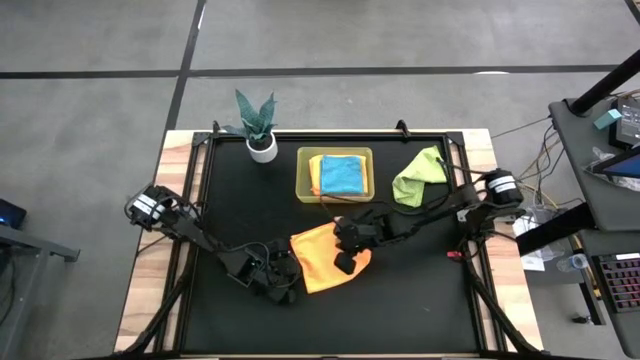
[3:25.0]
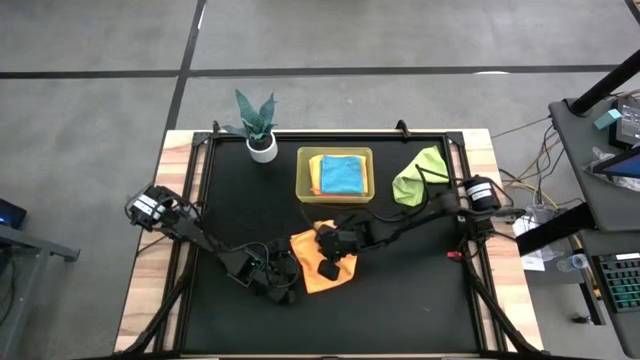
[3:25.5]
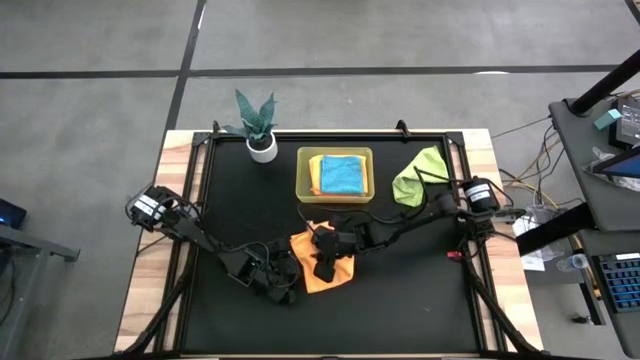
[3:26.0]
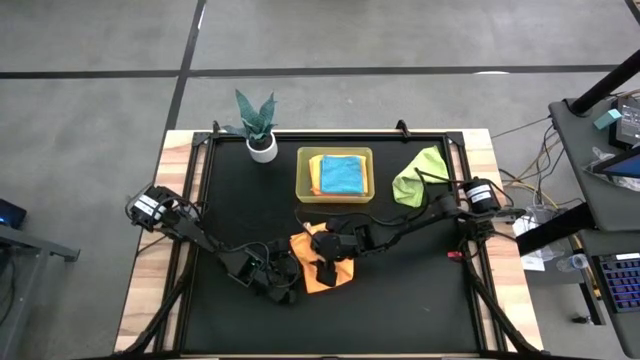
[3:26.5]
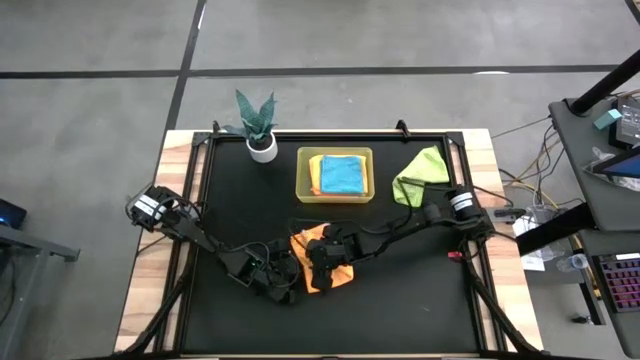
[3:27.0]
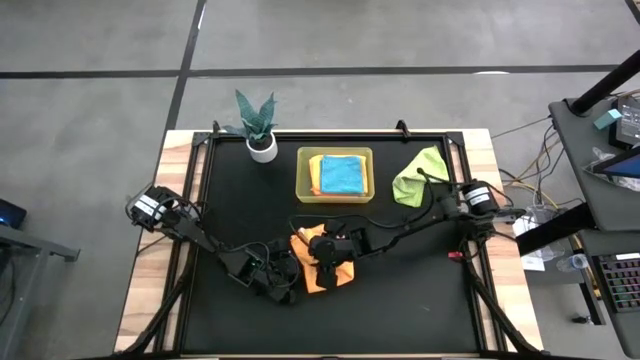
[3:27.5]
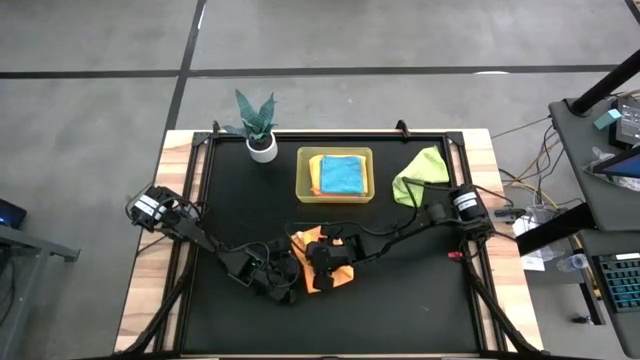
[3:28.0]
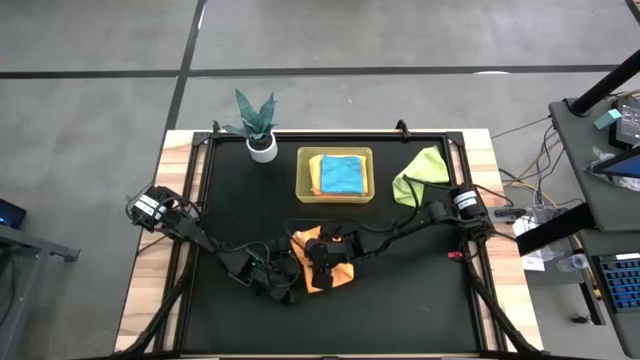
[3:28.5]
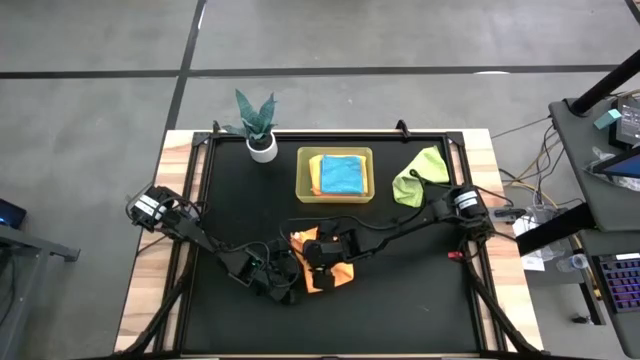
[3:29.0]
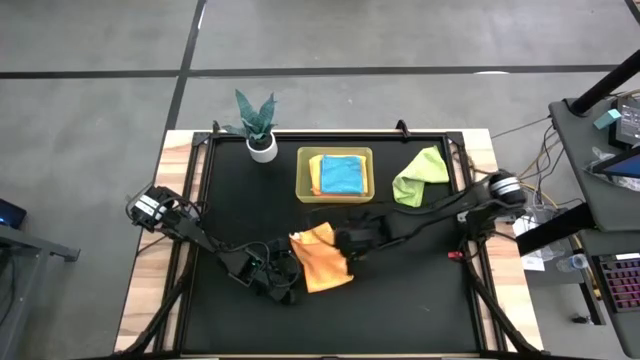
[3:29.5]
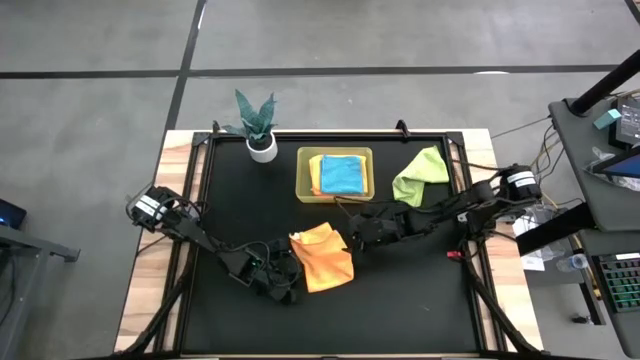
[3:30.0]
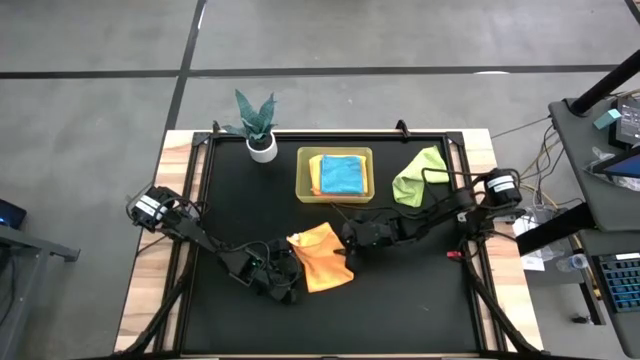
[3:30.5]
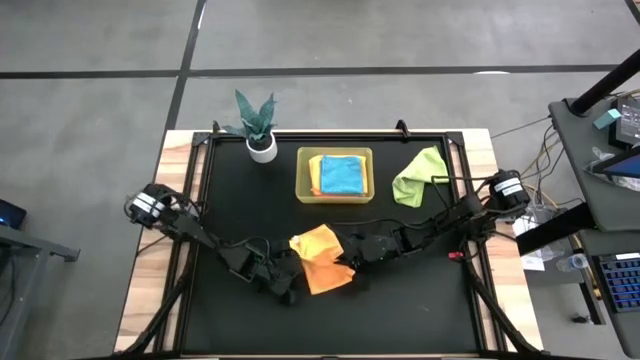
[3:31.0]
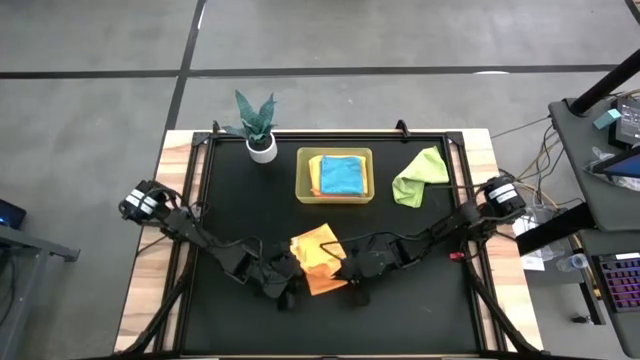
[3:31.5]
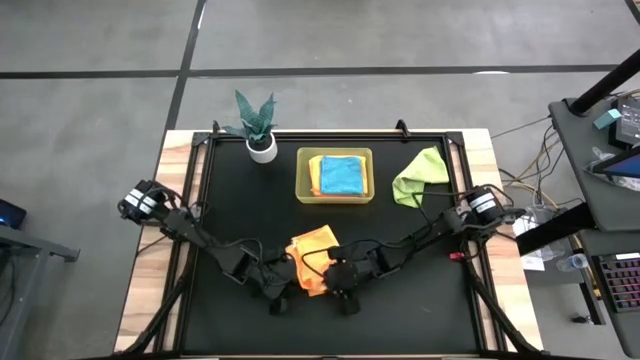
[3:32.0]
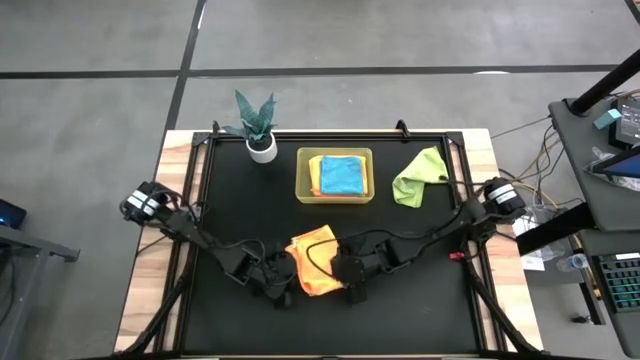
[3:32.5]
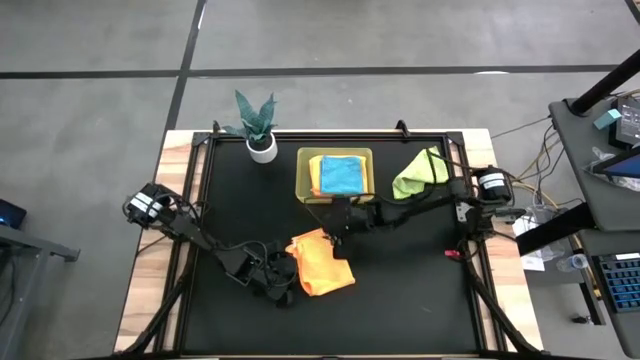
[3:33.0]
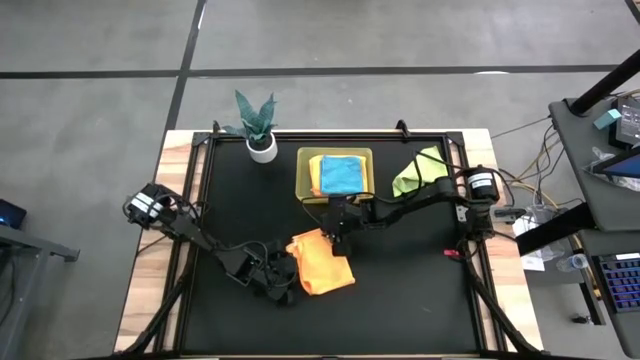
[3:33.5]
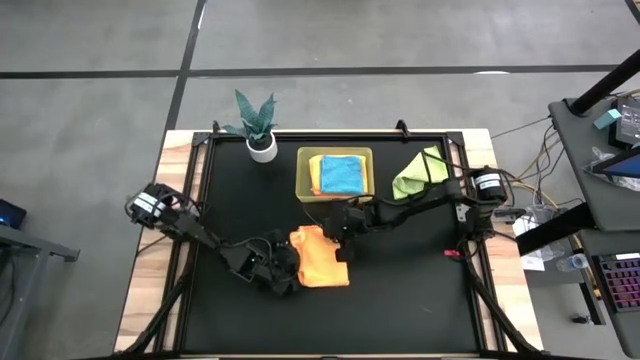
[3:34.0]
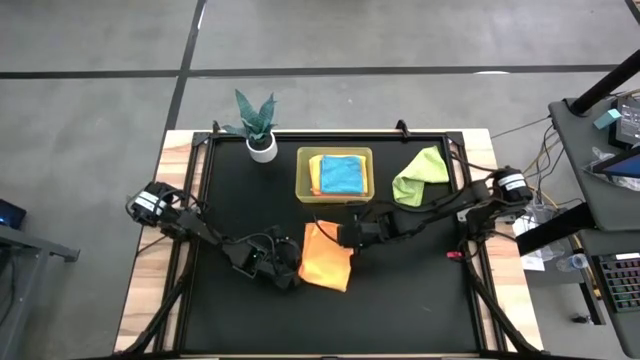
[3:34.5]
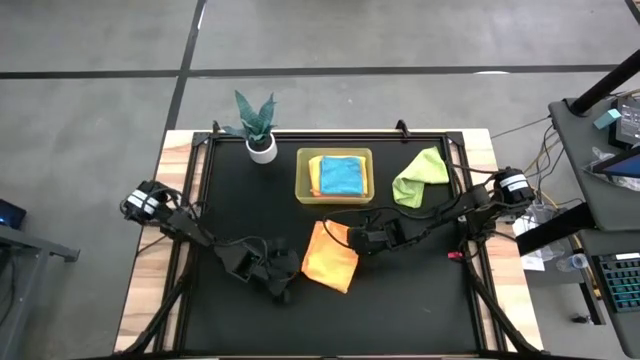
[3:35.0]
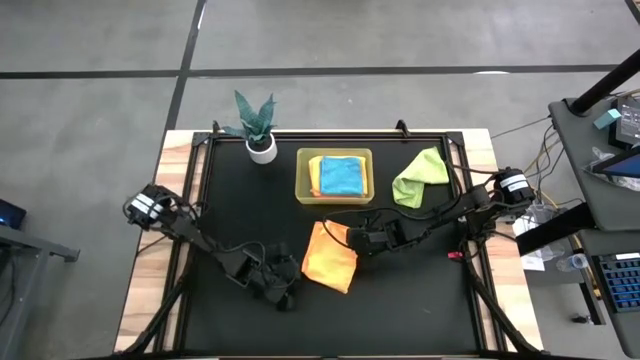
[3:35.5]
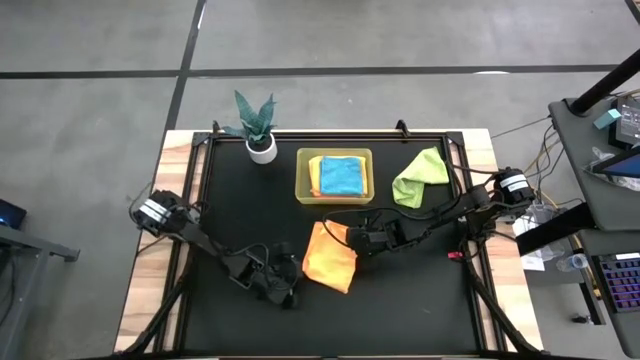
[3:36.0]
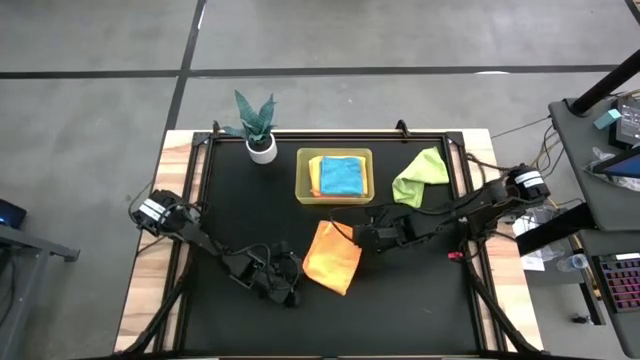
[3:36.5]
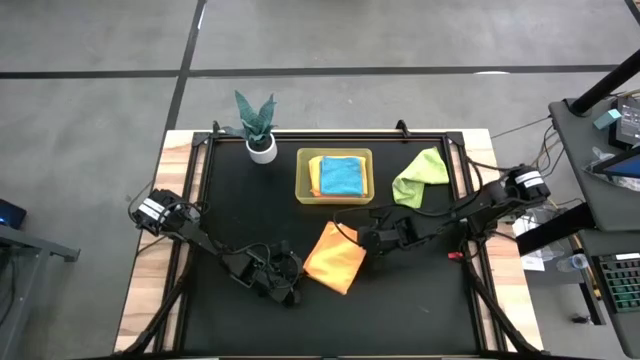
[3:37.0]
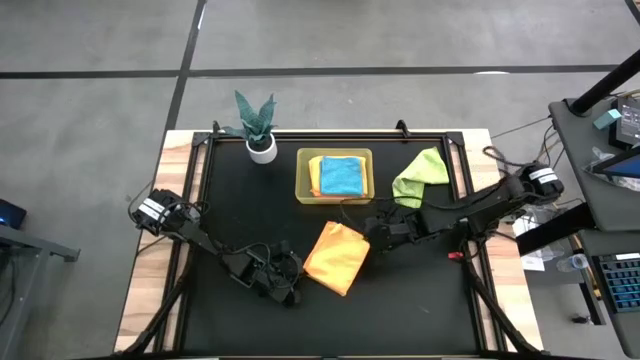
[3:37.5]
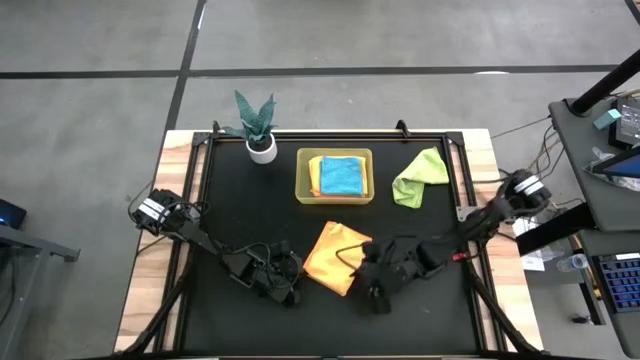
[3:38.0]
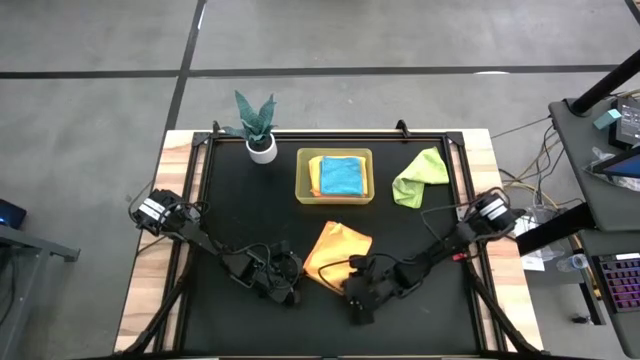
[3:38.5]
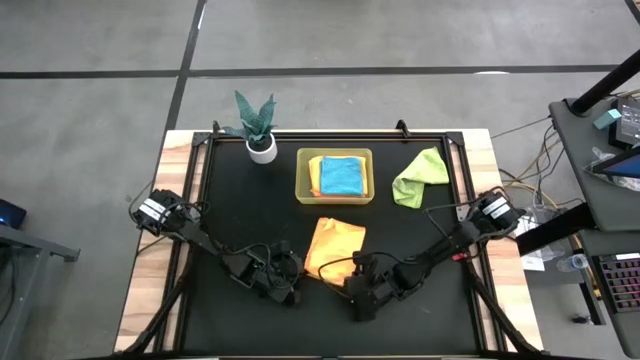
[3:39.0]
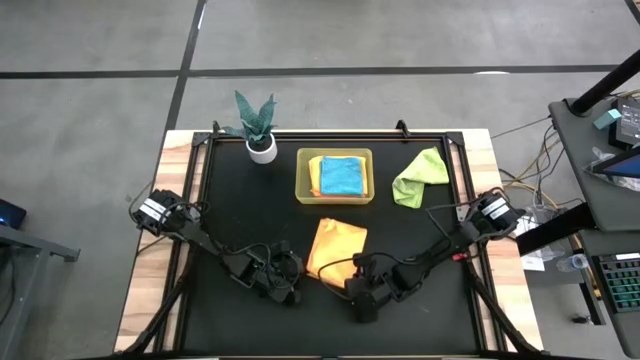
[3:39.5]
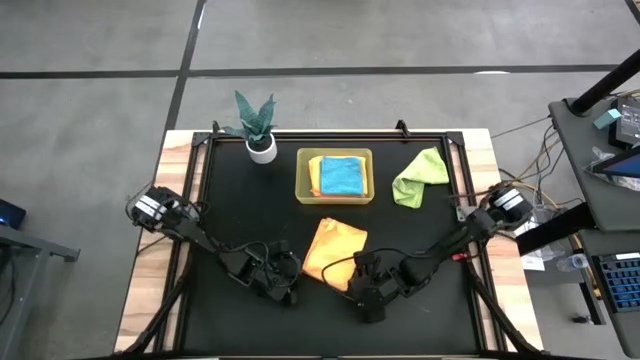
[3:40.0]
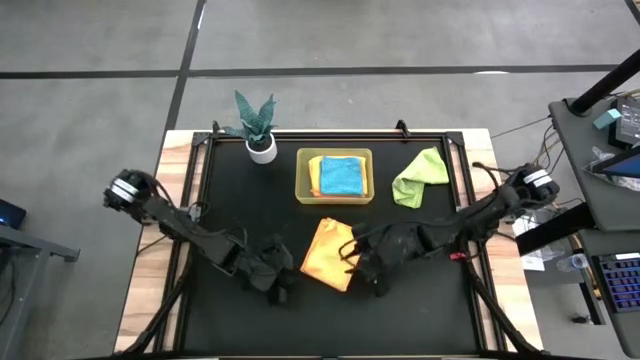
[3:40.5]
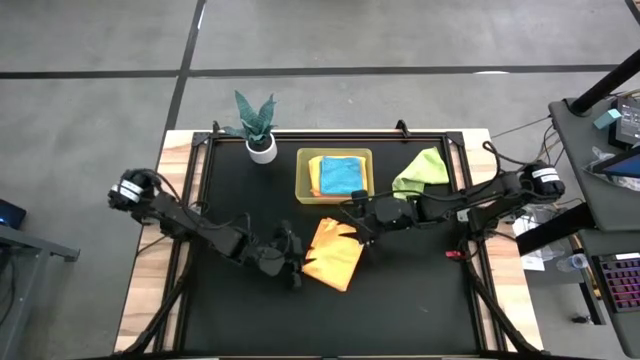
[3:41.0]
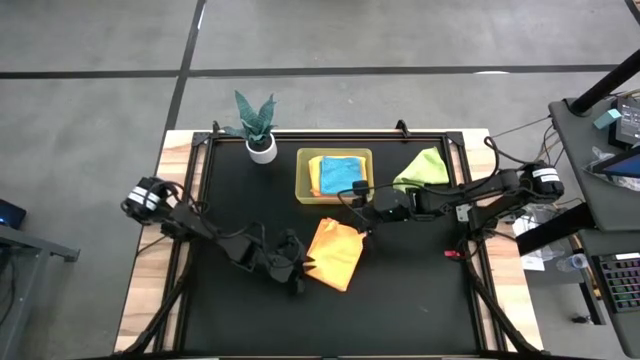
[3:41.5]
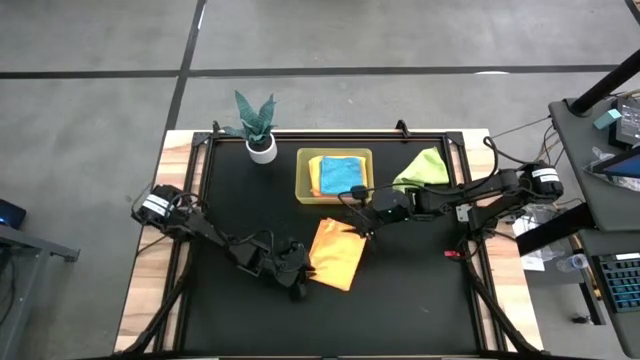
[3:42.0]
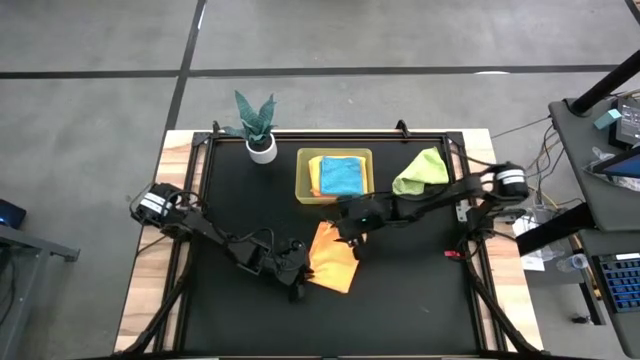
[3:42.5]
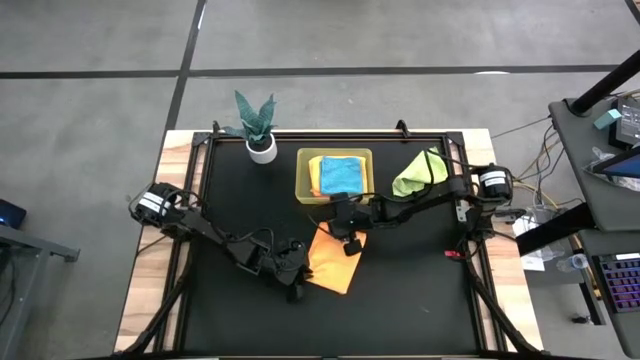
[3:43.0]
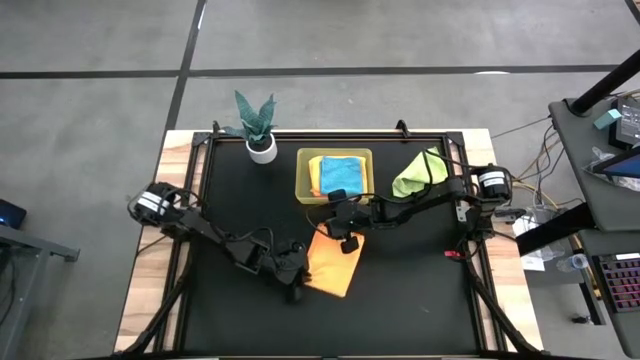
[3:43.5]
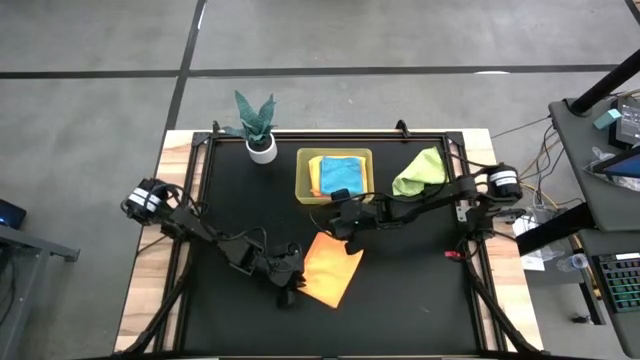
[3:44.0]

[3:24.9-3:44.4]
Task: Fold microfiber towels
Fold the yellow towel on the table
